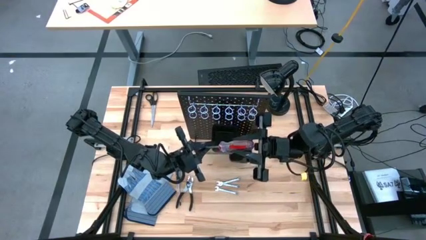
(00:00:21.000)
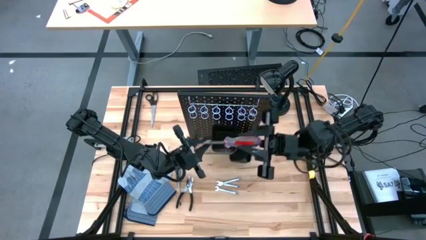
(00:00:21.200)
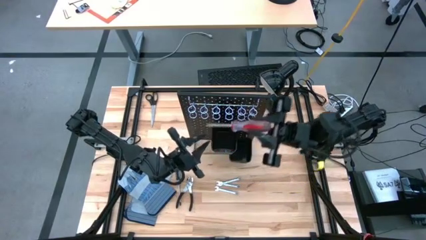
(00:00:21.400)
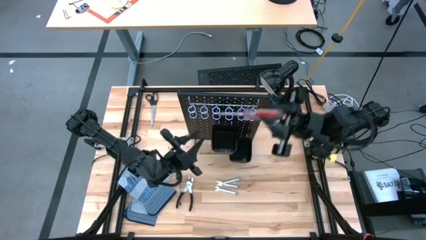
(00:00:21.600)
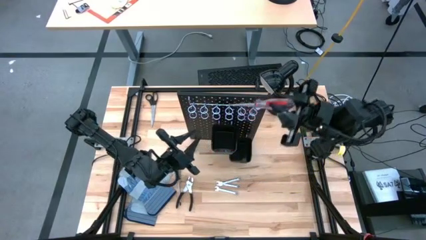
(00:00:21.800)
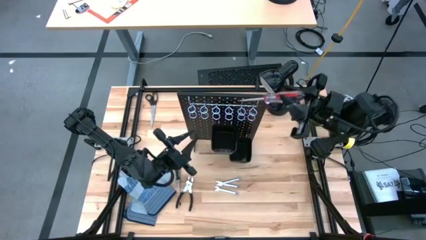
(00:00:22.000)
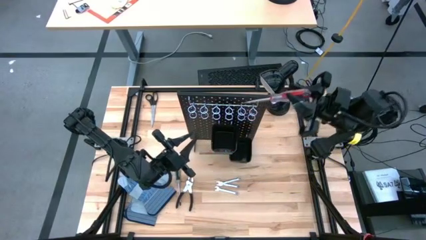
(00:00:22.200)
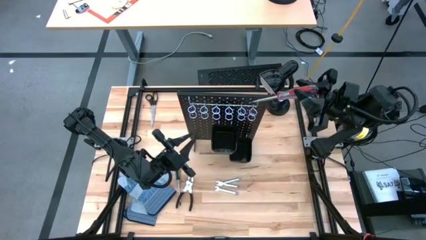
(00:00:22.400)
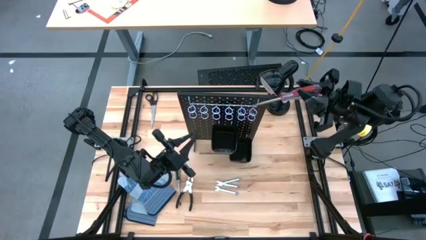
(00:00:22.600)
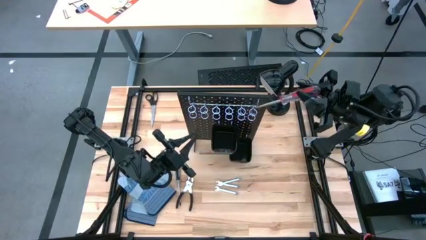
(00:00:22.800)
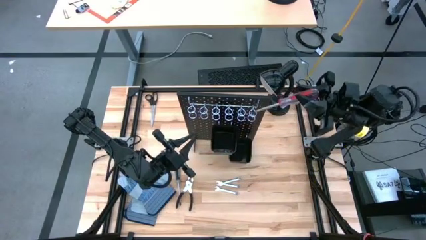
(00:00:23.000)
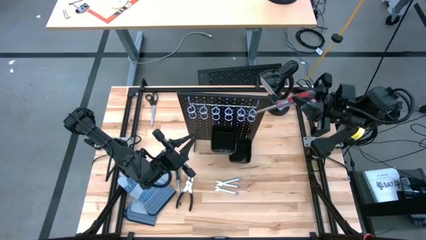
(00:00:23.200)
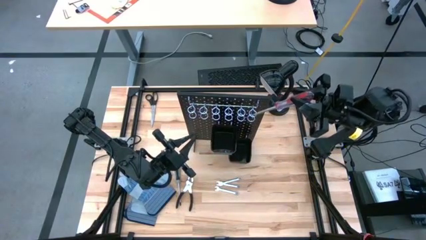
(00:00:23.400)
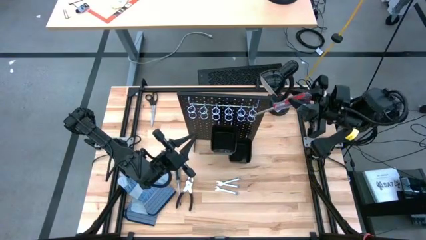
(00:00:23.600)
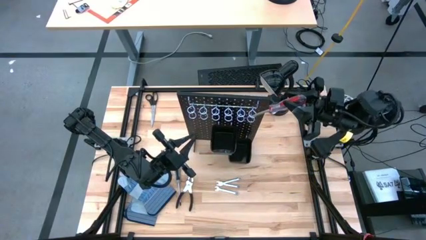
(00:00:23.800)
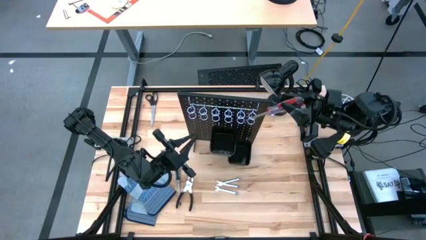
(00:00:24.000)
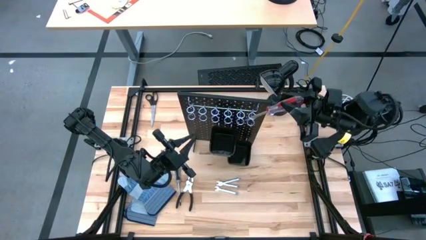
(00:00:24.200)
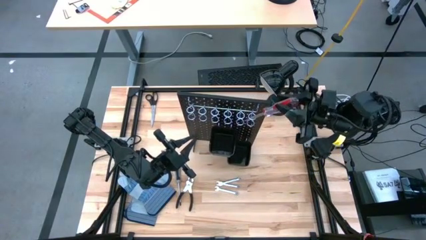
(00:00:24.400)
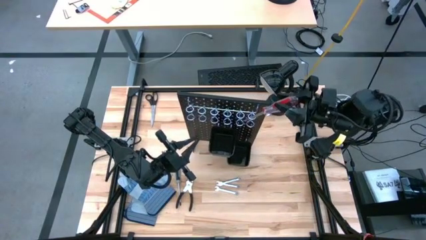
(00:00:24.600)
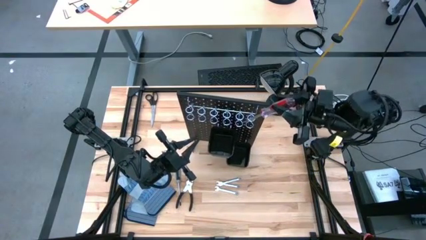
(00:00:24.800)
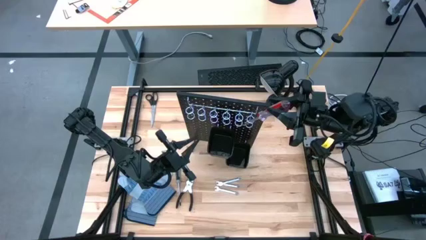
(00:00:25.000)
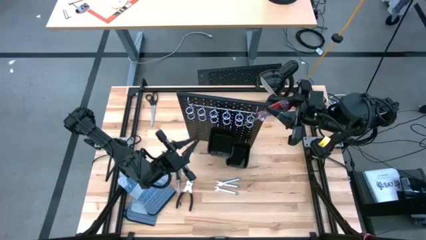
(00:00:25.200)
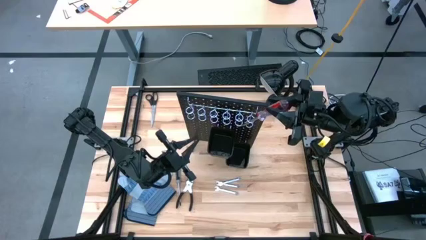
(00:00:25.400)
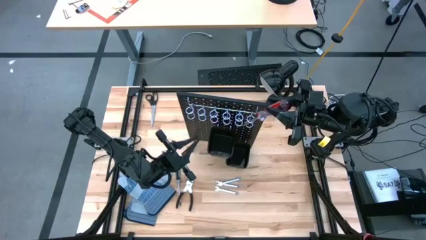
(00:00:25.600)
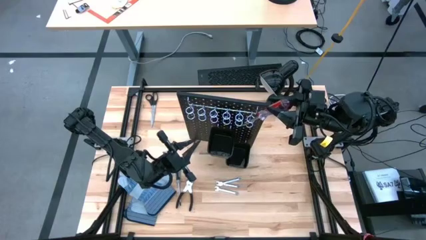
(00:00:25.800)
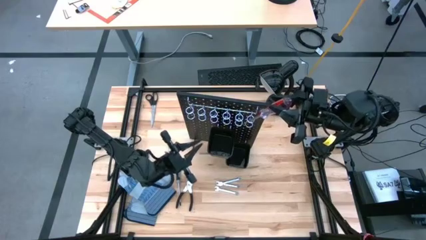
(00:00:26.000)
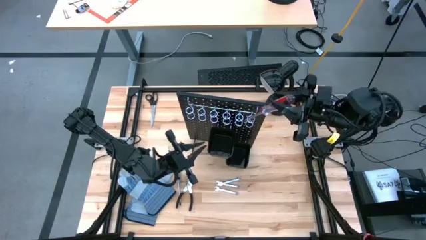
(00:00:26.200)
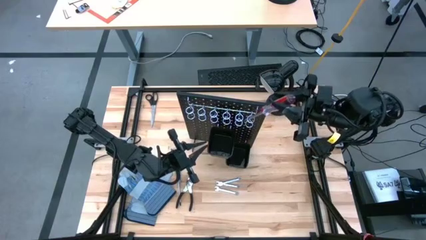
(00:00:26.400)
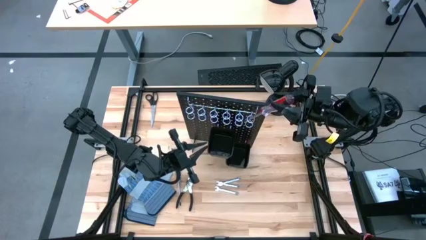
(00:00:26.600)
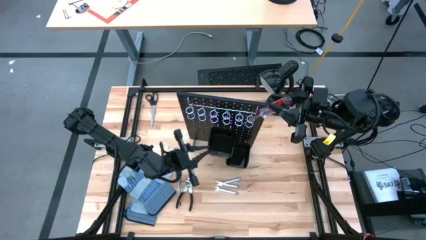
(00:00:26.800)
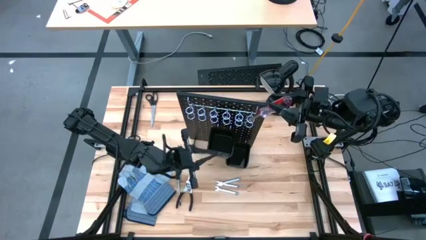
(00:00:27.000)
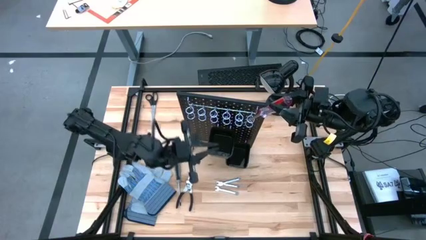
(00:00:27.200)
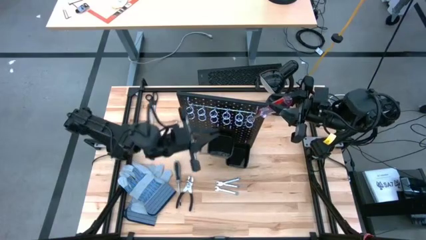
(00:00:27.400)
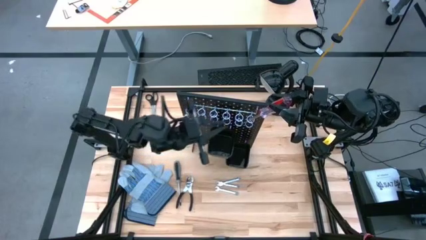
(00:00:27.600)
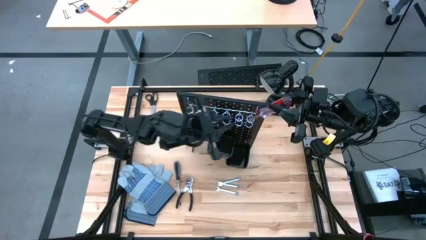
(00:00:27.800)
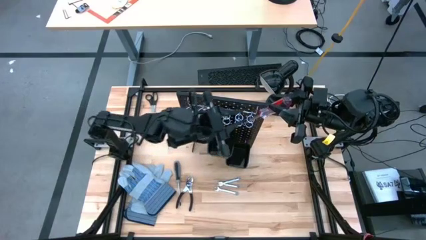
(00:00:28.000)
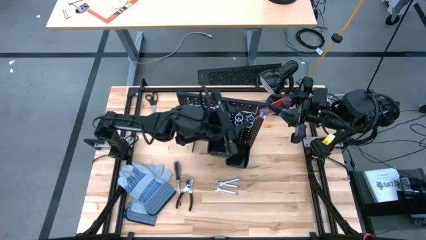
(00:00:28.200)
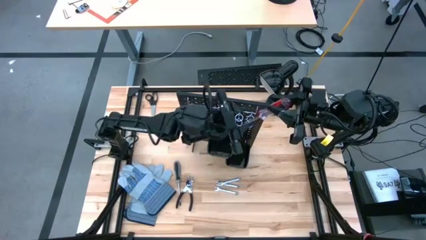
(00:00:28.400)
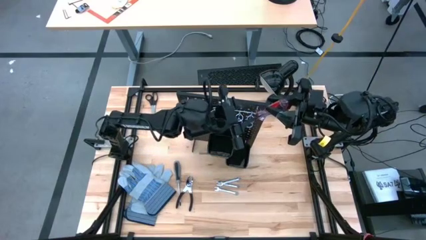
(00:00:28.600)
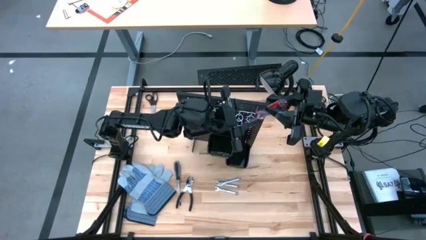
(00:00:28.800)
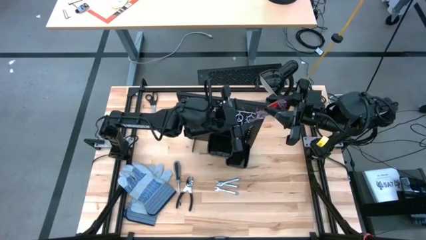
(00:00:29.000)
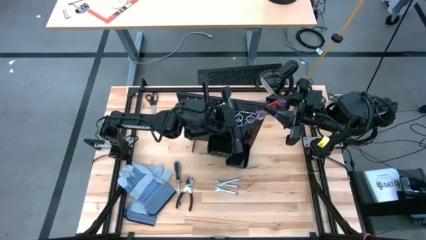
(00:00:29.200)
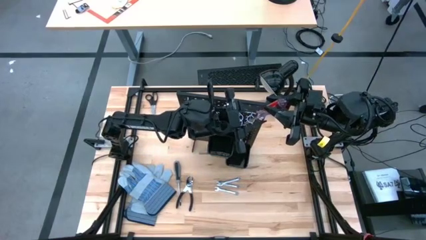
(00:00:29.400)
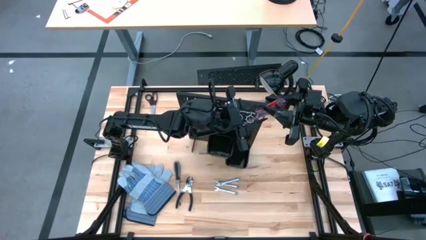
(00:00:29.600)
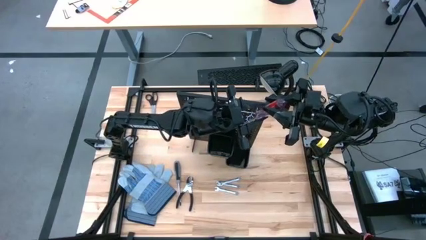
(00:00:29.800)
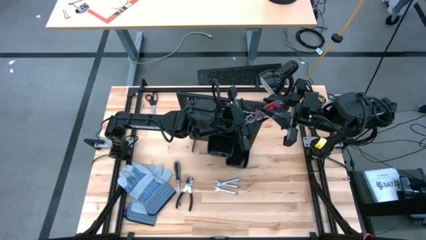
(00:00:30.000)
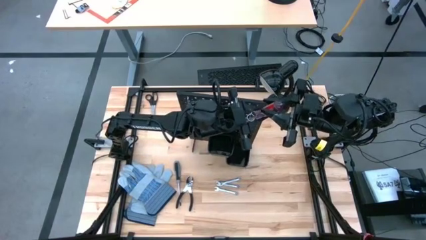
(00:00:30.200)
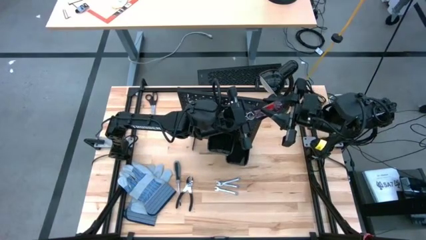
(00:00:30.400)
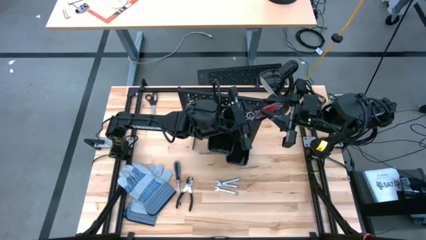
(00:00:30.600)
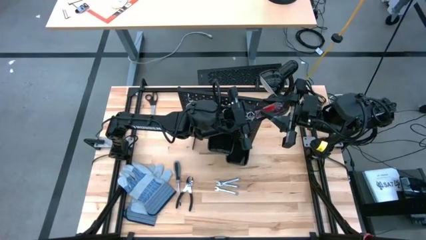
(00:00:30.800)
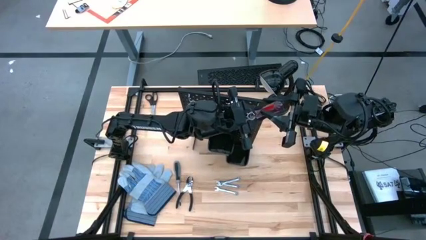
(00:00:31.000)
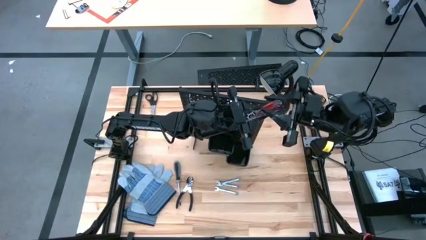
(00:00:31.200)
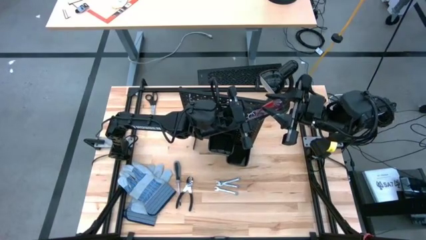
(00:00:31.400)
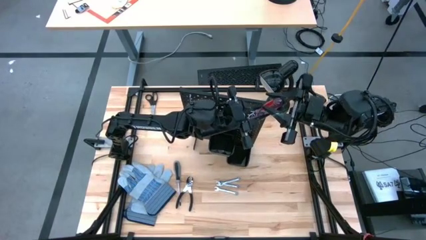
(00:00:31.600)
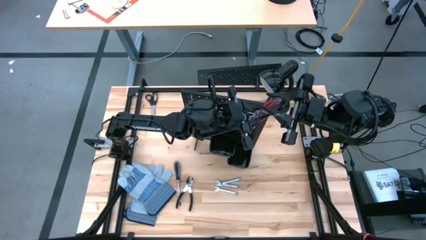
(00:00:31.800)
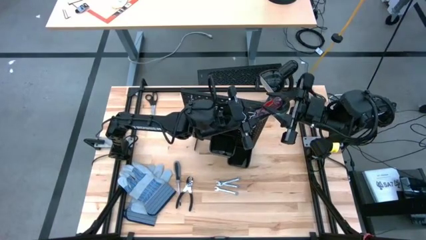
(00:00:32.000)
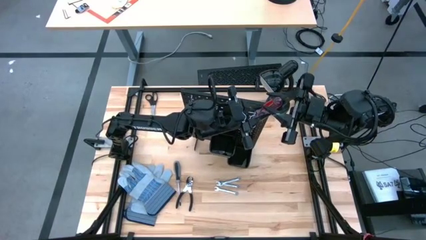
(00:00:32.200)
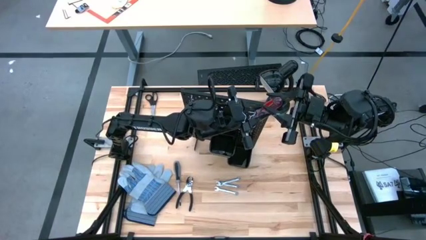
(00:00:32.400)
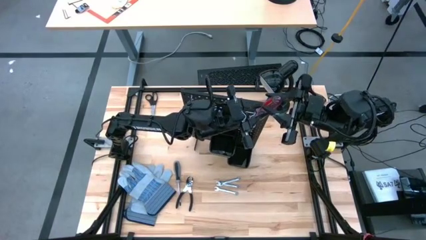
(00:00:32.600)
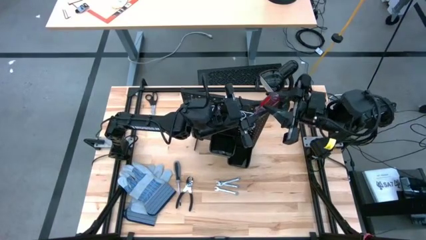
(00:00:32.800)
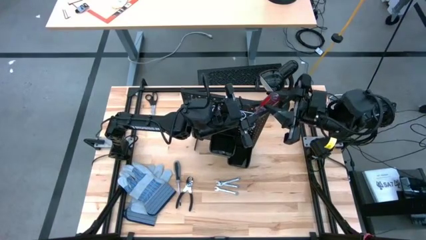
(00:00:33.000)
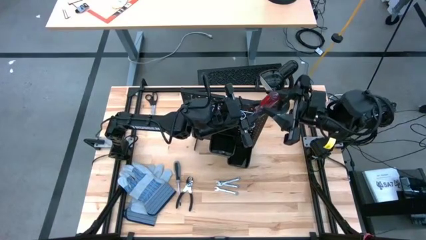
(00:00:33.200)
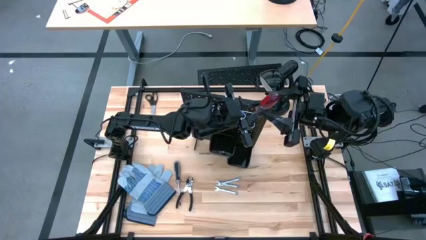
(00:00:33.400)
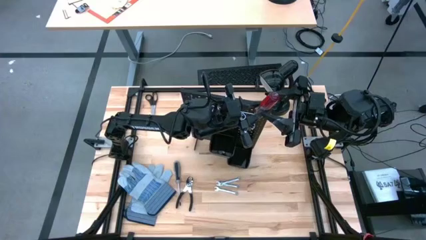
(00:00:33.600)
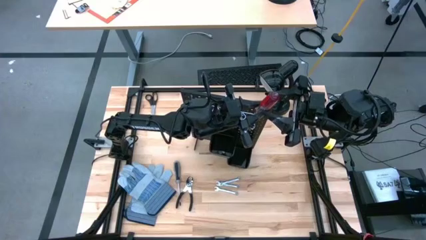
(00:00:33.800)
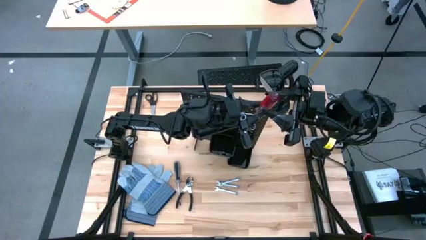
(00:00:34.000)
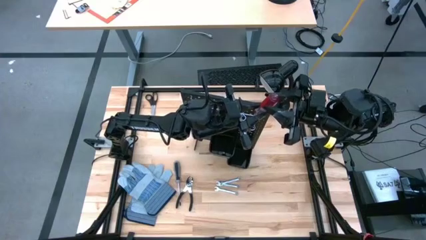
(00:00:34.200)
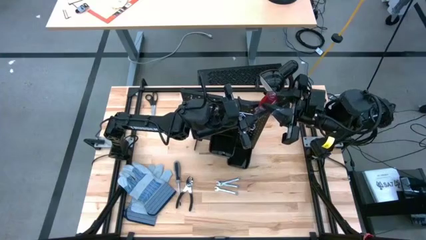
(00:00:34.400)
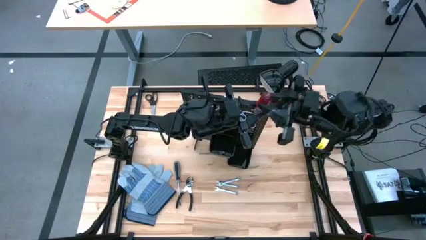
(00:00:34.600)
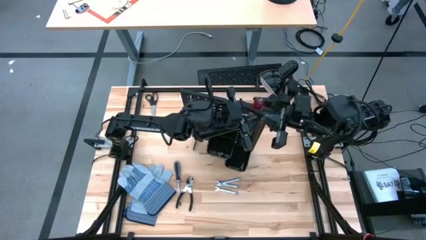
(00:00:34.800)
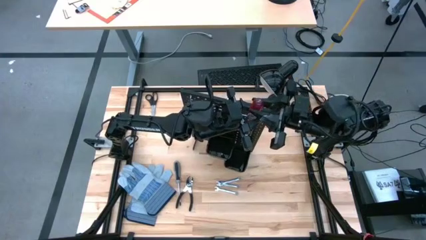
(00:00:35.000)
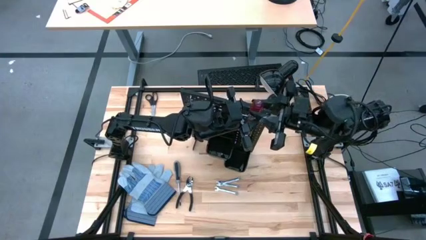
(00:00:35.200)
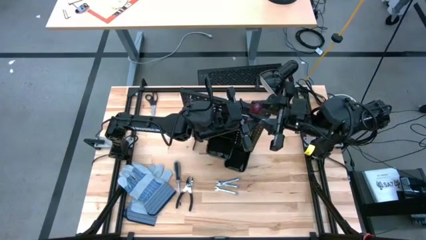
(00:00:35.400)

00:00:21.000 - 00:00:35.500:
Task: Hang tools onto peg board
Hang the red screwdriver on the black peg board
